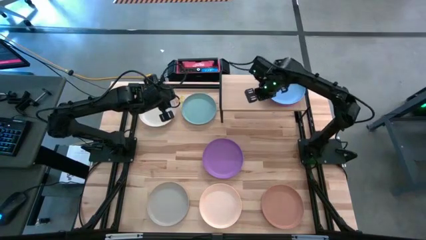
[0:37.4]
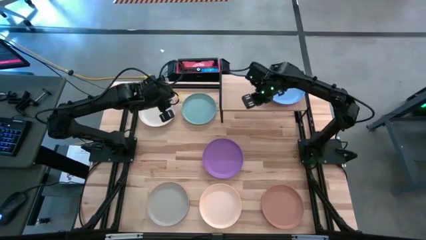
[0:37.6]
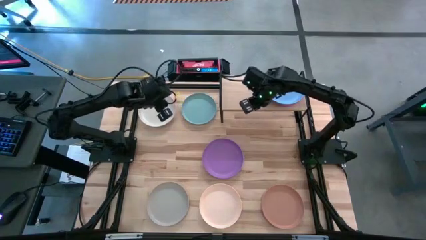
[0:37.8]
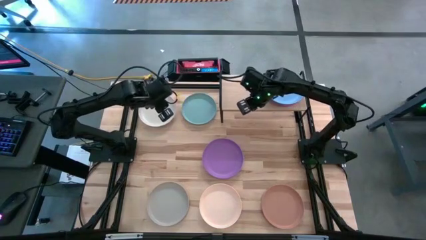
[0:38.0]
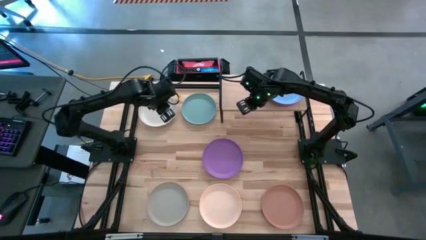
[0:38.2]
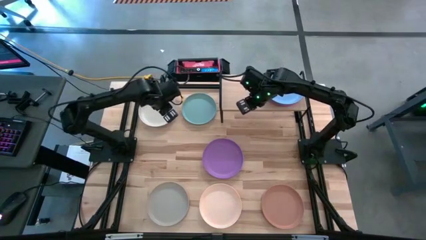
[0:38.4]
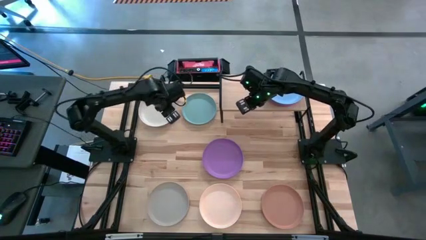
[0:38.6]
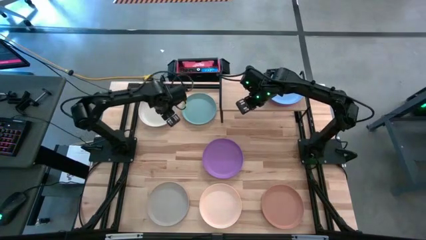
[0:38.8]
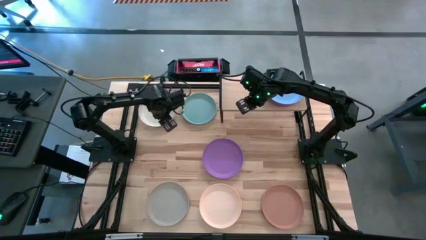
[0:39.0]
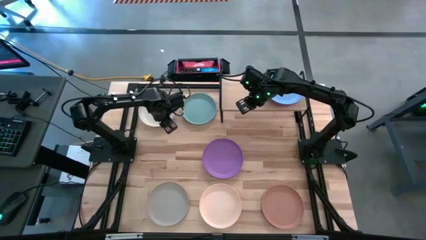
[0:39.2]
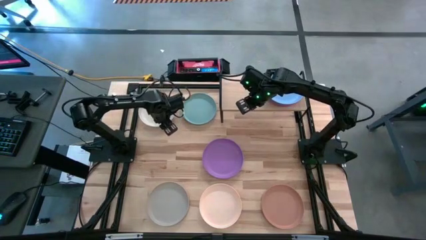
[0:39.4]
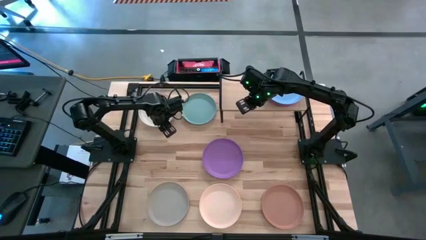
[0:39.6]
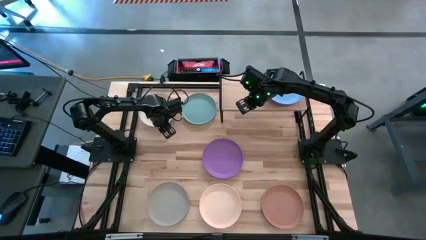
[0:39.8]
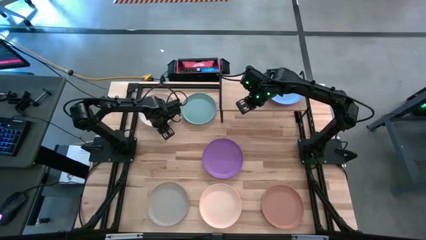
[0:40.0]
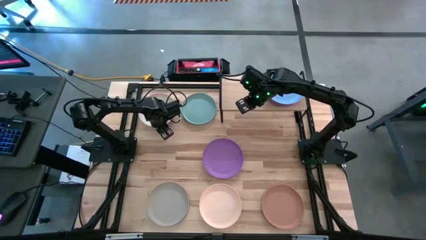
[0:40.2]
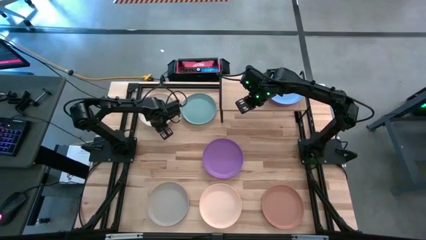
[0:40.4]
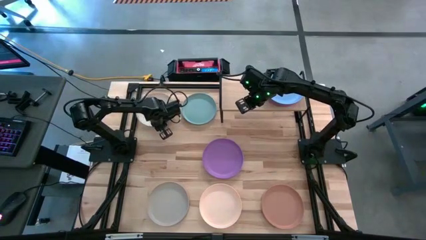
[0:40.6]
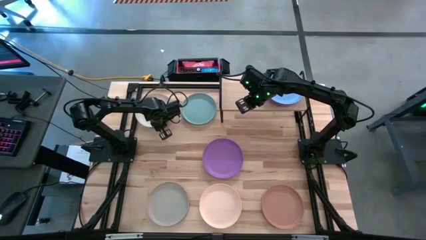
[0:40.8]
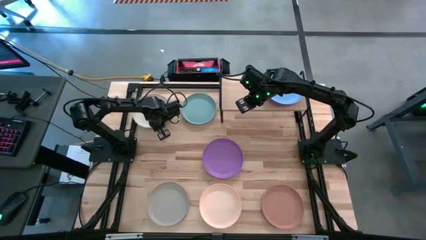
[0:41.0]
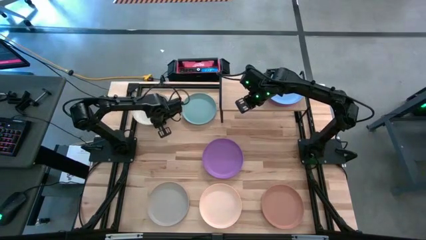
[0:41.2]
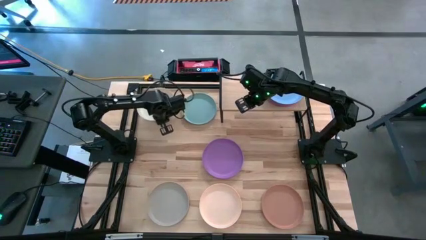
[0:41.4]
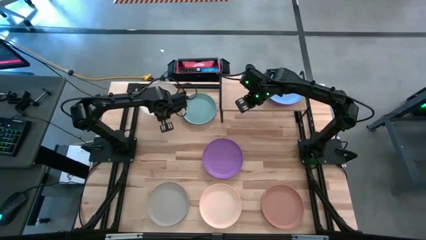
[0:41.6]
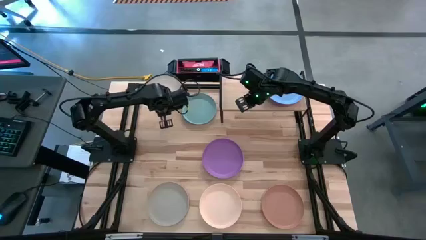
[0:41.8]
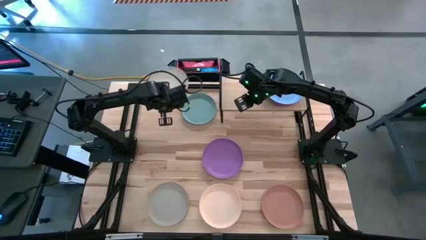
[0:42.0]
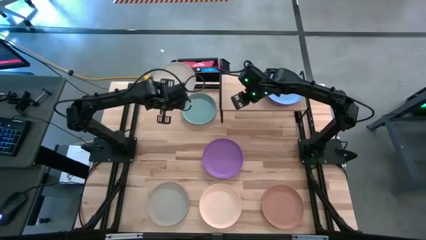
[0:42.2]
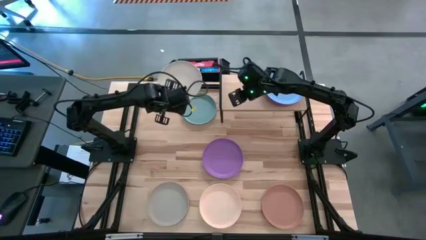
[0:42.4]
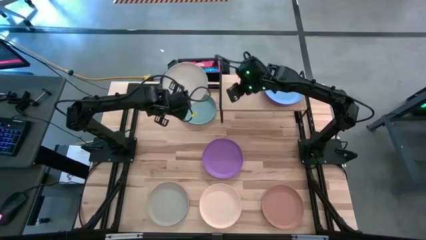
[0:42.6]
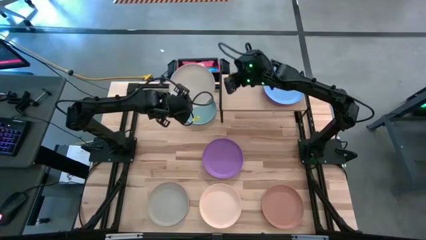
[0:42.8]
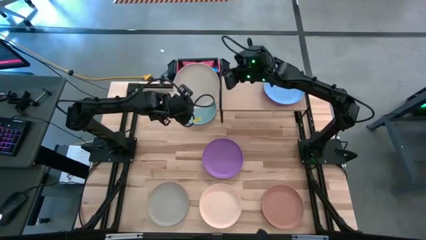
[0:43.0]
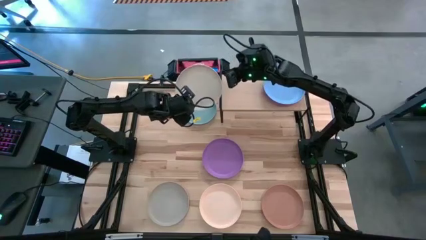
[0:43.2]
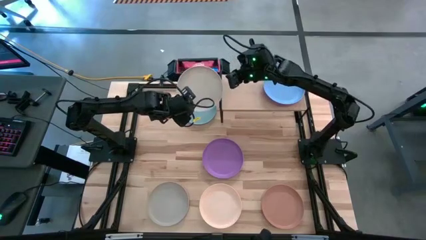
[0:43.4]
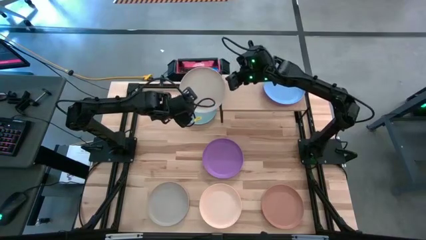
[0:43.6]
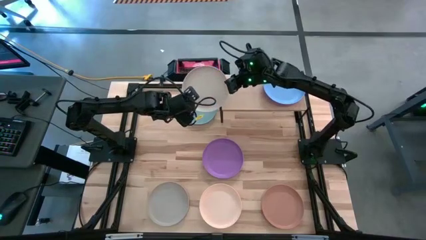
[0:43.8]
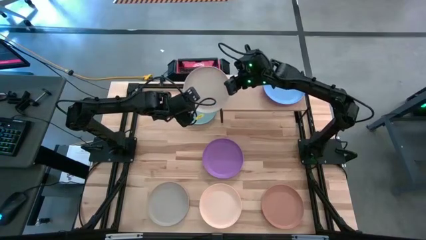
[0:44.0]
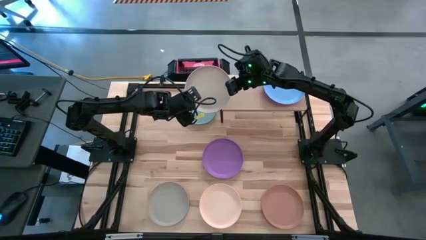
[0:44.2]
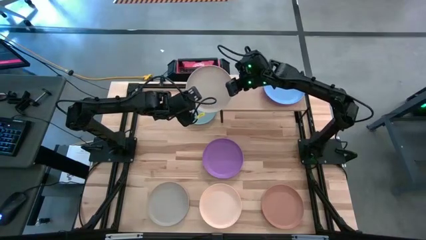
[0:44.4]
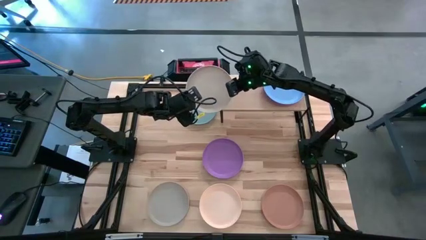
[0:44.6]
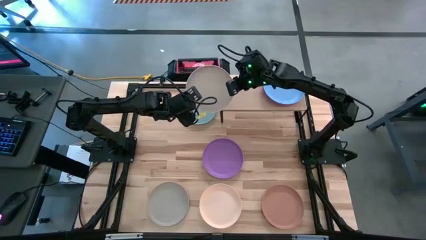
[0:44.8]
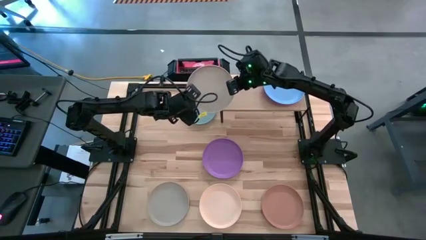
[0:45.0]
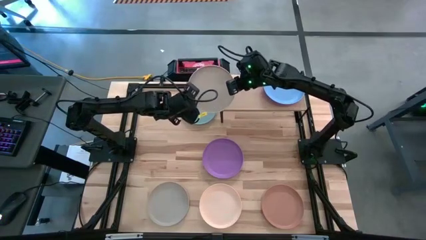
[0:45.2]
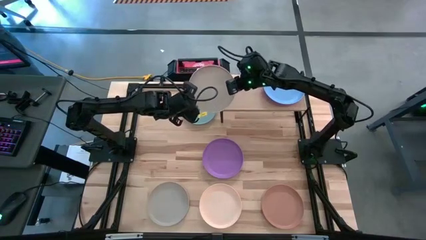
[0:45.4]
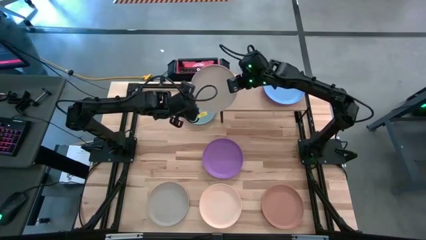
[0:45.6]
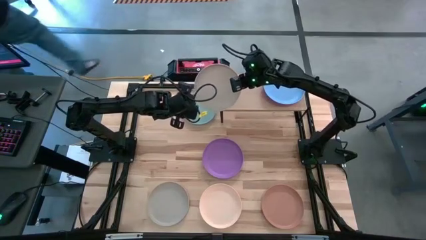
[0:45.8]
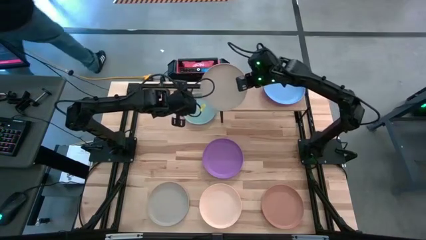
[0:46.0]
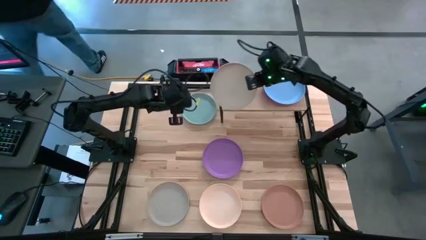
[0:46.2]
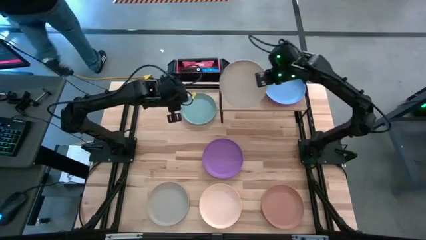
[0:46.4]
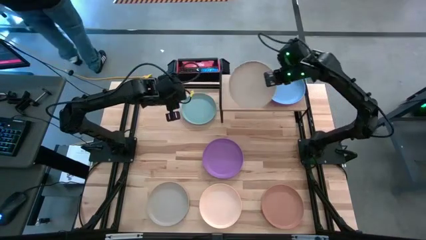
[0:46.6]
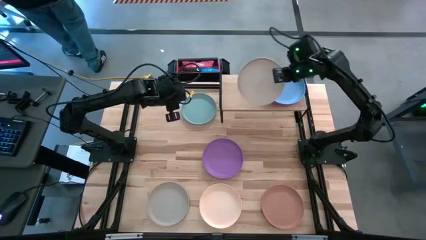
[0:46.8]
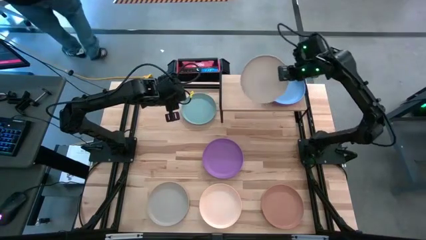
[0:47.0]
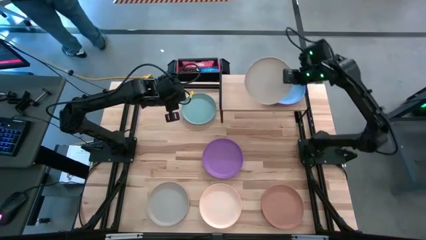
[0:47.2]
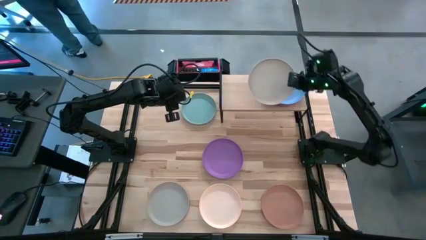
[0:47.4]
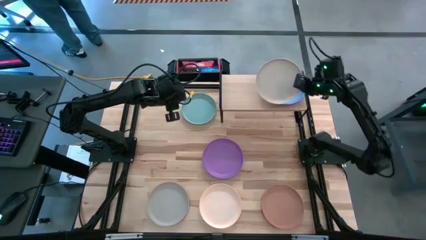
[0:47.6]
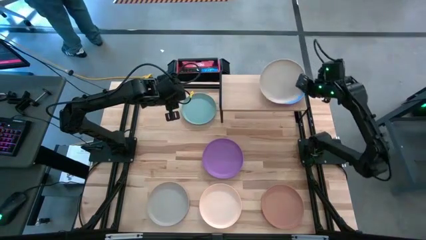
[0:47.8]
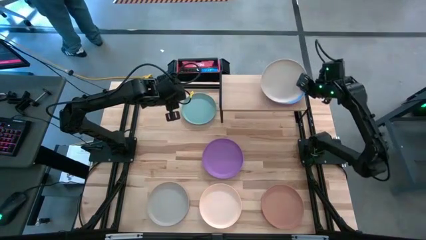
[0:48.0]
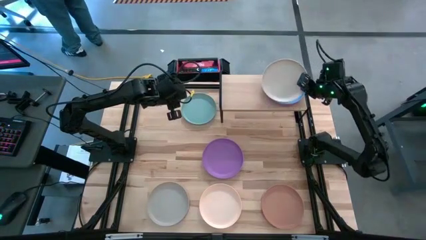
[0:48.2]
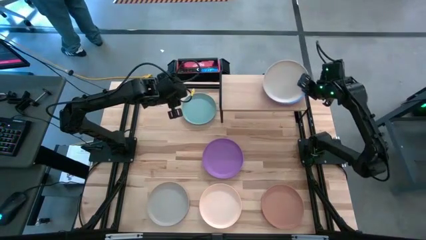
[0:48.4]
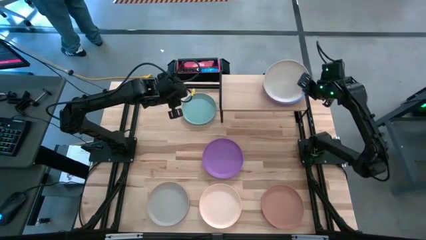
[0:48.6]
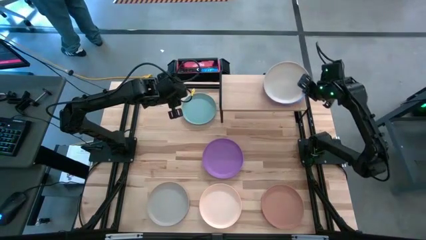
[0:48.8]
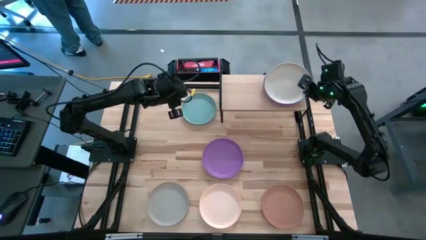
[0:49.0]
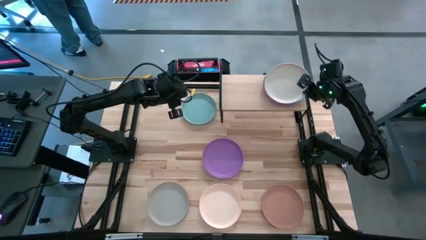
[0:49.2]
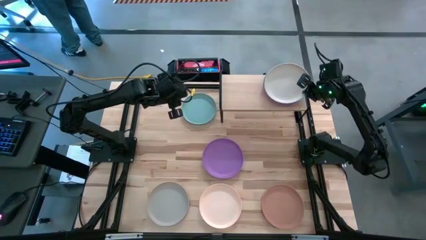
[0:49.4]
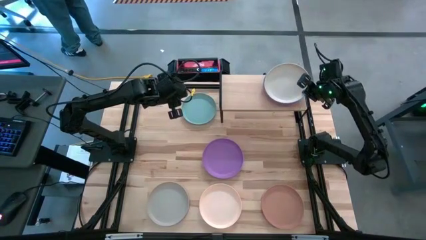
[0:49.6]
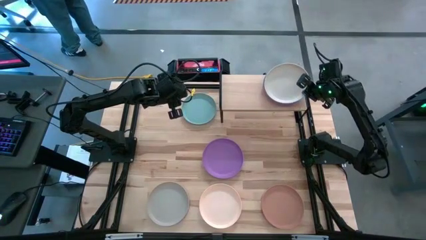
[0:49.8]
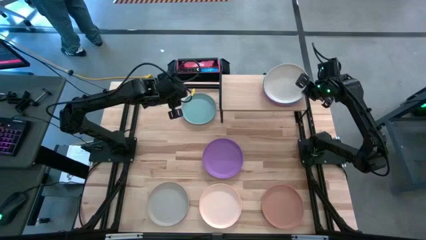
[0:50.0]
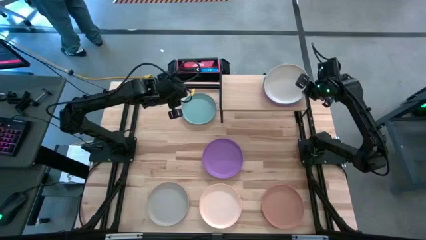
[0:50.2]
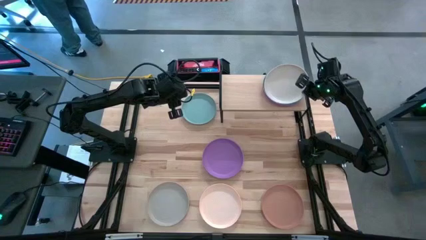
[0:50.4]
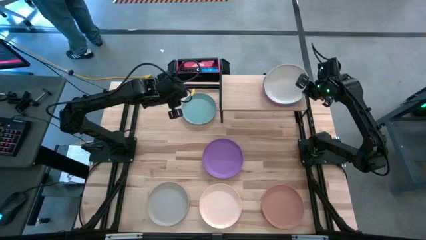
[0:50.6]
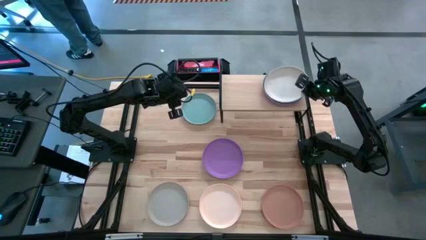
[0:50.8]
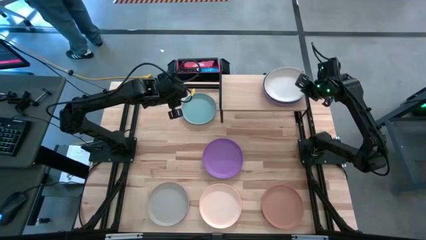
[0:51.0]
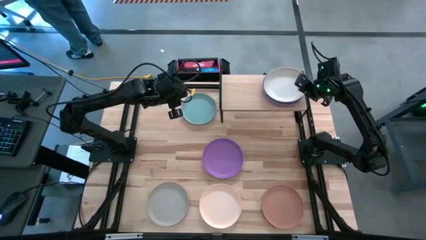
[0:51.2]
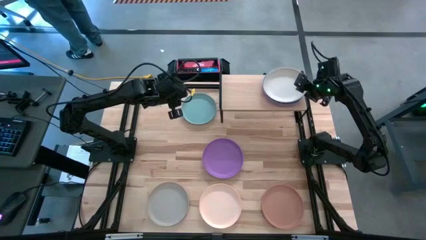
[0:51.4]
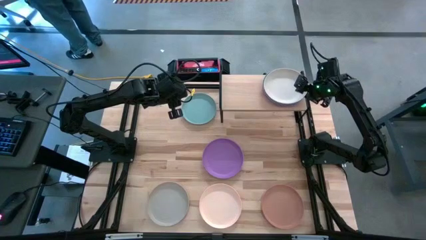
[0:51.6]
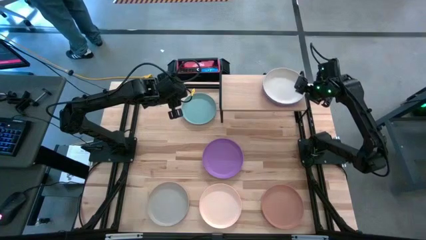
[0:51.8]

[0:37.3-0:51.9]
Task: Place and stack plates onto a shelf
Stack the white plate on top of the blue plate on the shelf
